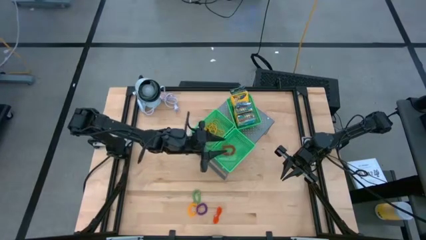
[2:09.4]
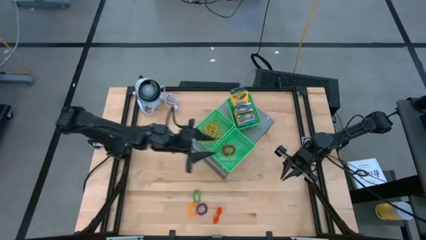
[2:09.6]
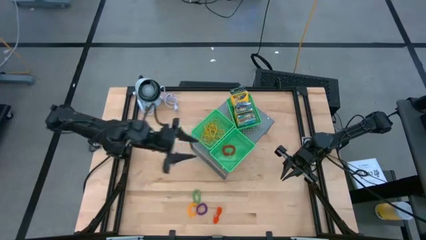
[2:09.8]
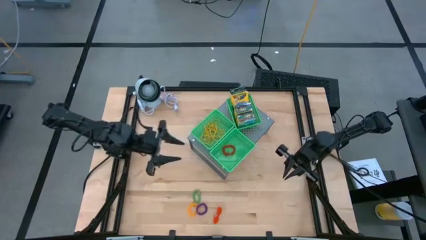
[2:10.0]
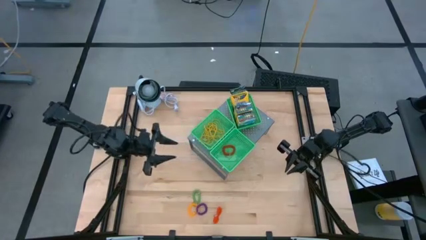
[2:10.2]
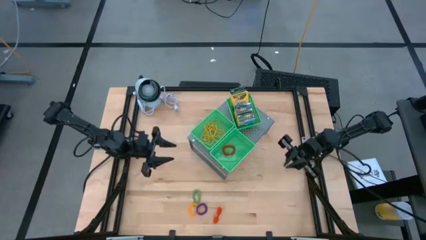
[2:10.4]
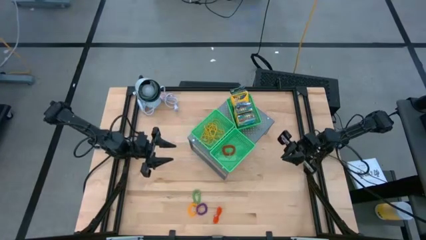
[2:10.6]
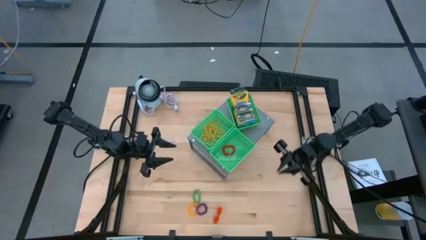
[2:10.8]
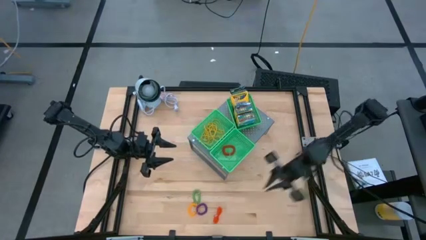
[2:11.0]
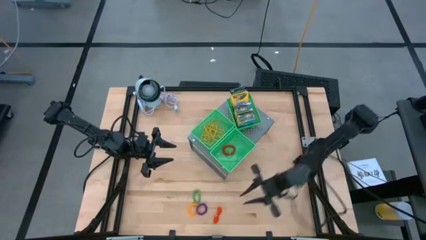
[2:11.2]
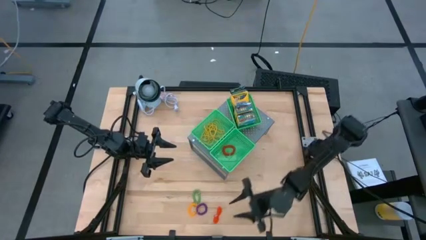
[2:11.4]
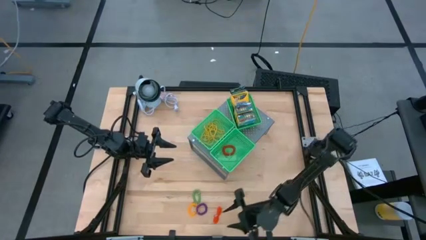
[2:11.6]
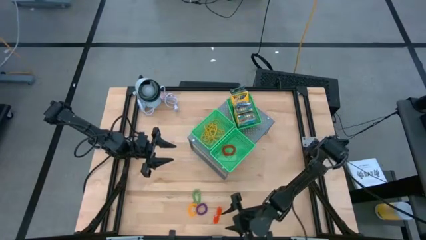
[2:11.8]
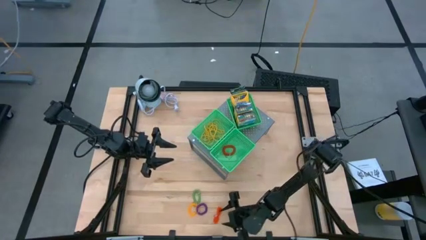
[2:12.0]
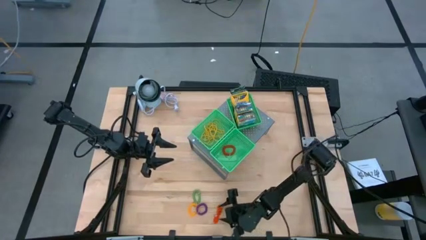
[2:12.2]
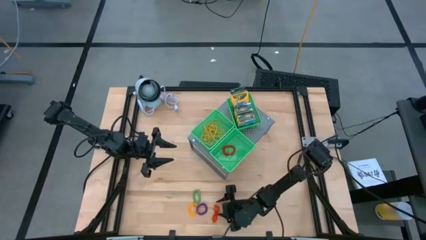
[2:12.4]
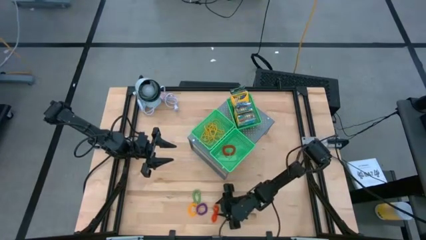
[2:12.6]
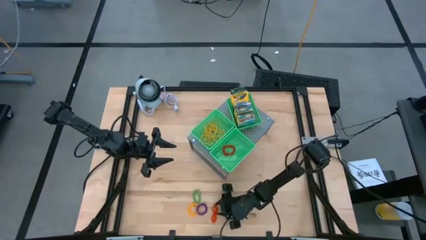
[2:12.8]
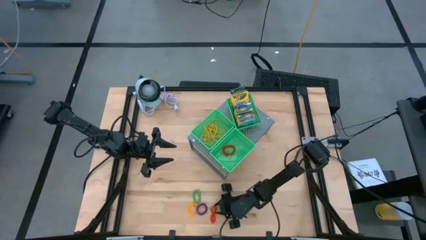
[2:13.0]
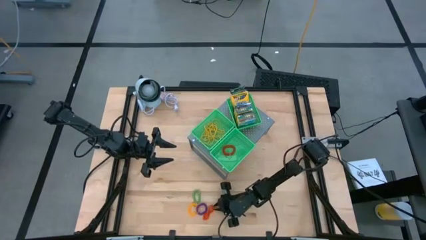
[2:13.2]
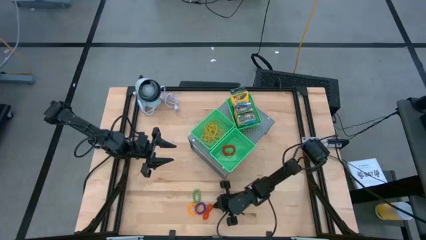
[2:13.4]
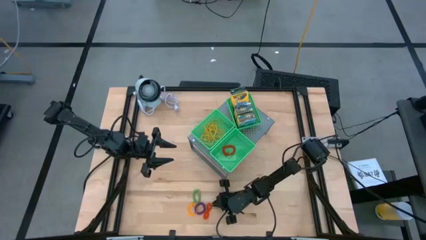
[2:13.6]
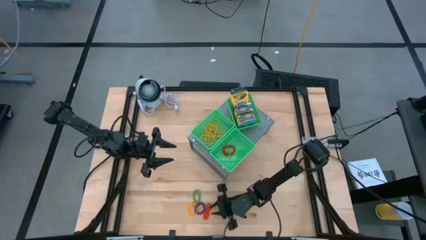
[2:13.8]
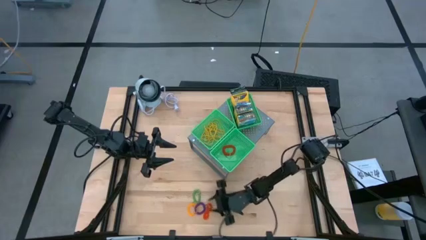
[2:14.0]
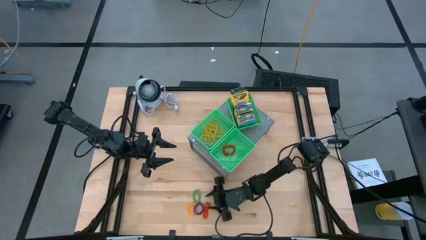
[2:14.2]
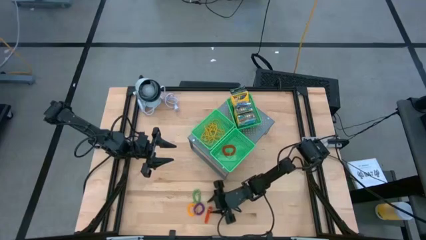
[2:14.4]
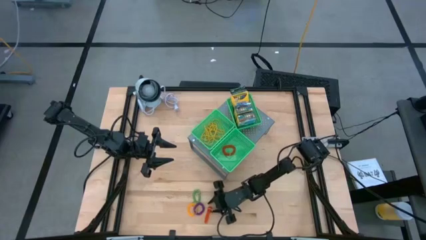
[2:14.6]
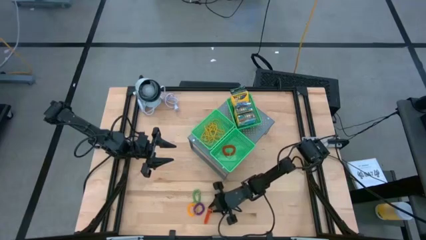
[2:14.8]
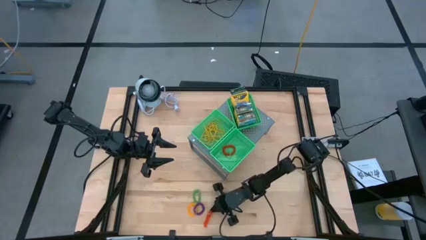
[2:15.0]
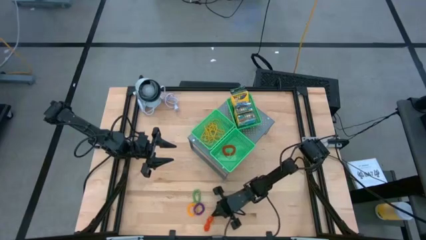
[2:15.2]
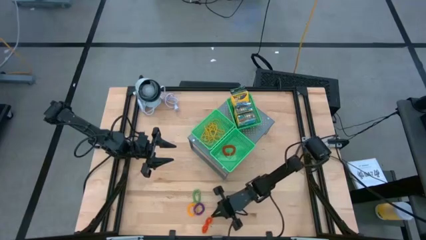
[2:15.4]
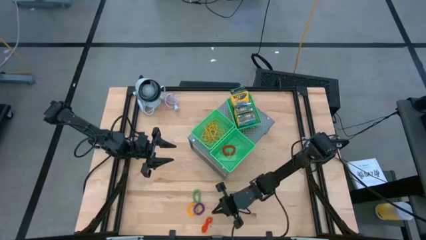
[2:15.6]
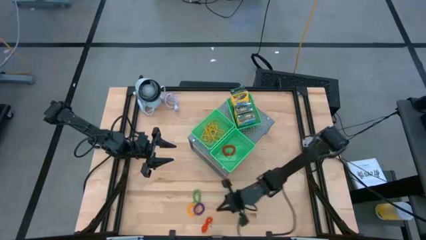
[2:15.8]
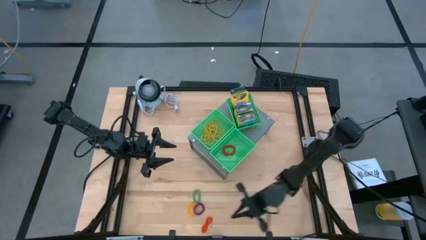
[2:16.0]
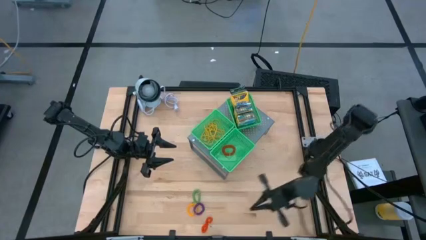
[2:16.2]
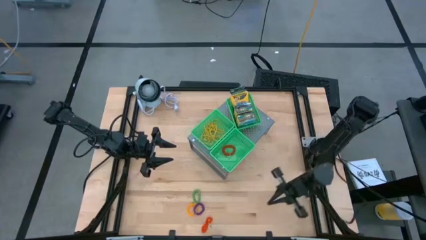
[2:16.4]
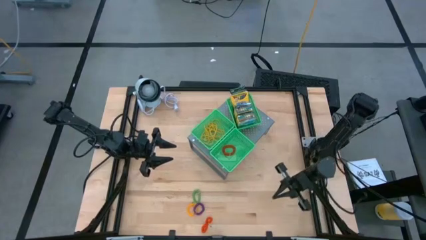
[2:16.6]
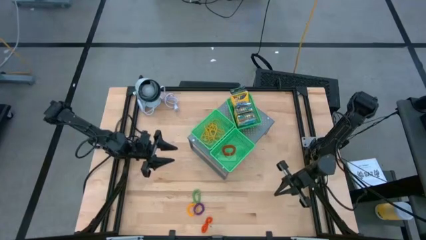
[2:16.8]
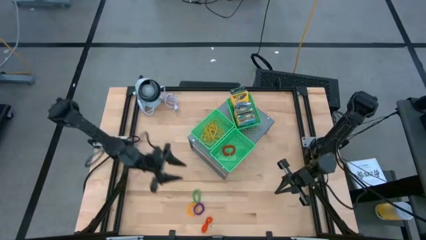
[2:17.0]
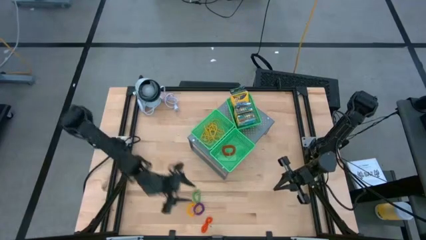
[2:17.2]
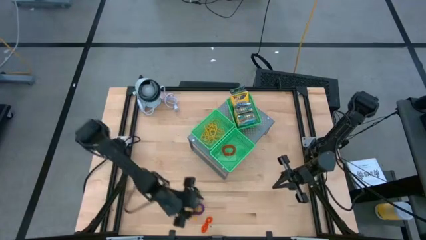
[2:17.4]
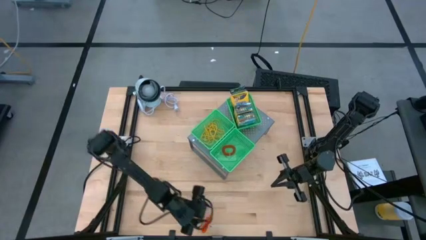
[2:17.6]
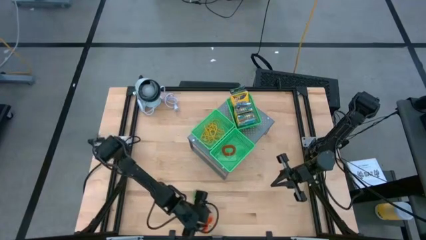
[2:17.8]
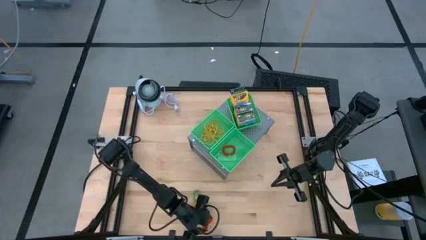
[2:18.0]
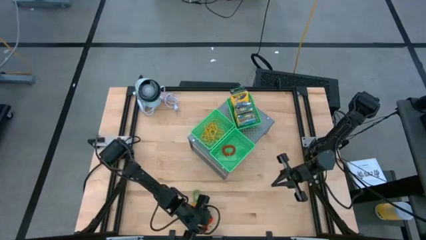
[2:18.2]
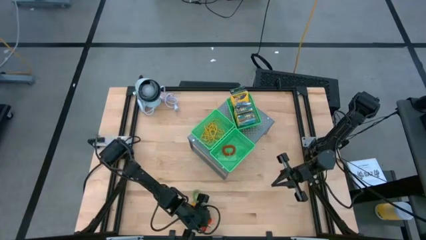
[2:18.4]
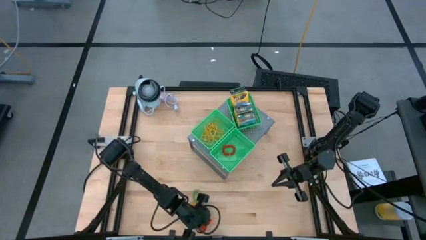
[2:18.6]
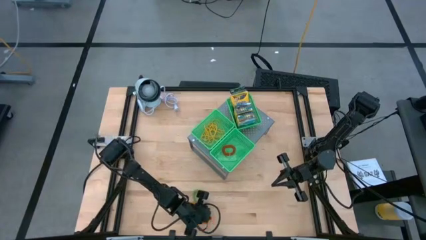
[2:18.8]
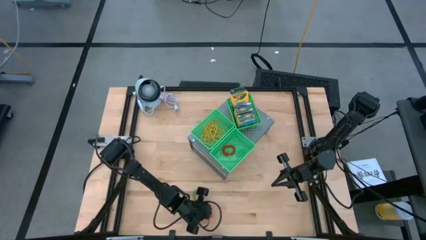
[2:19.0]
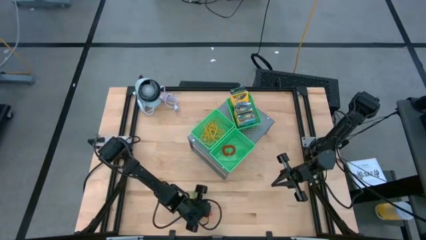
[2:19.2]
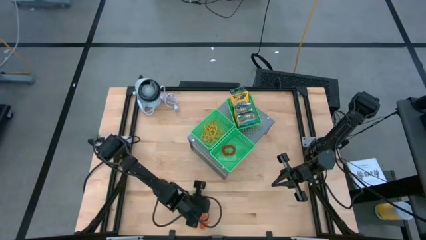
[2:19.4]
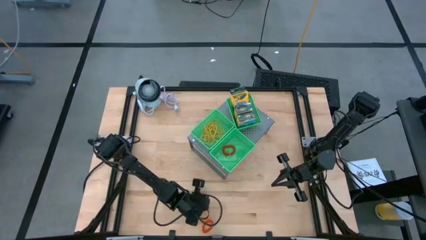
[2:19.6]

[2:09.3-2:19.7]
Task: Pick & Place Office Desk Supplies
Put the orange spring keychain into the bottom green bin on the shelf

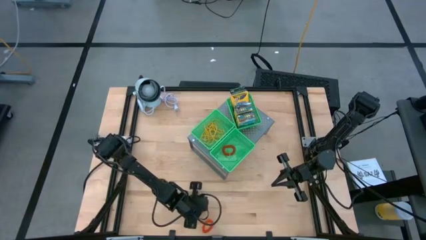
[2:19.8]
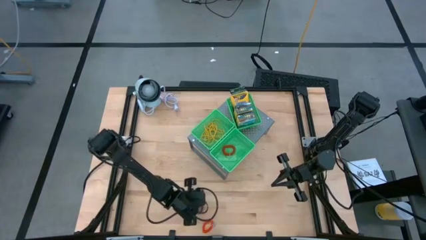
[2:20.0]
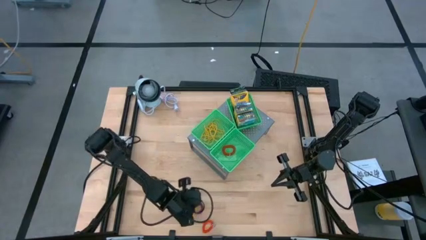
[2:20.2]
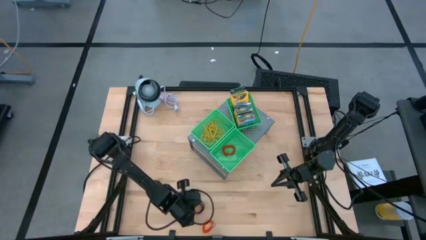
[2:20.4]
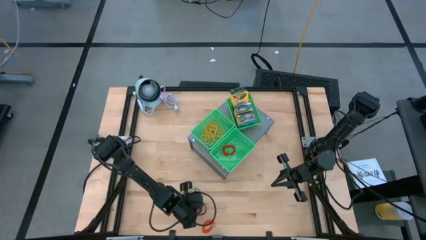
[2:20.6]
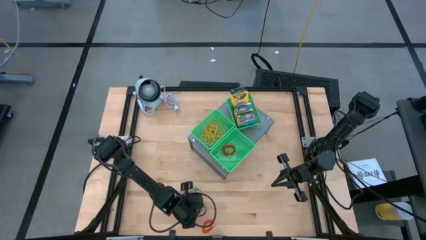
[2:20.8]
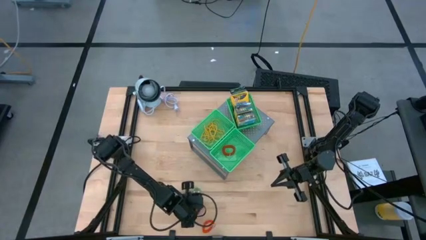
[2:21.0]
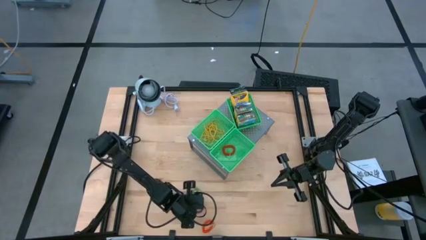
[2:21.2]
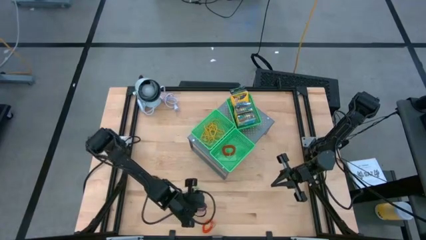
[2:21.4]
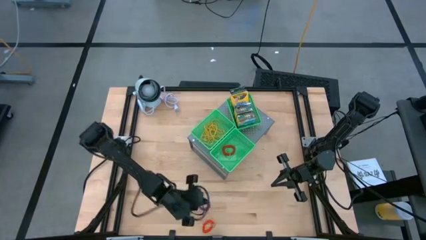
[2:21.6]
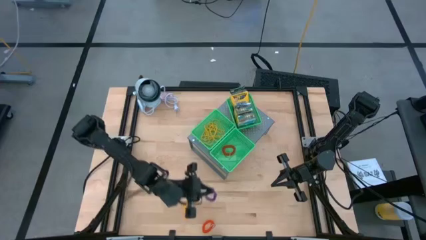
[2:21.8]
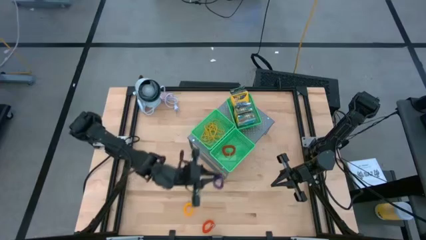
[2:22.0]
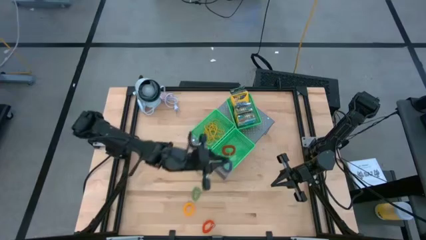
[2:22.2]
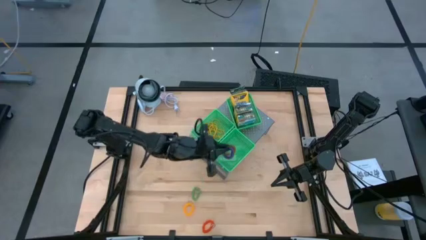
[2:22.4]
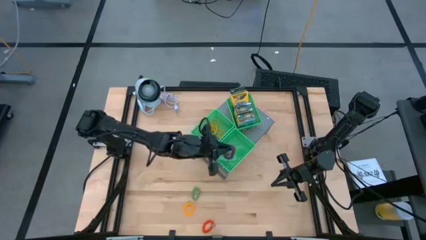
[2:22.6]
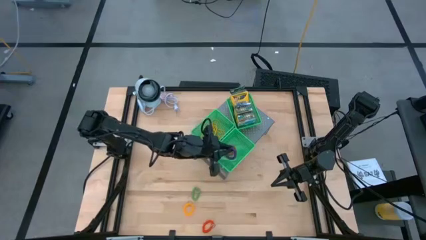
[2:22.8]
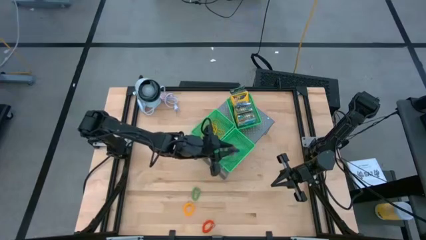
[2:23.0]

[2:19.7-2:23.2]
Put the purple spring keychain into the bottom green bin on the shelf

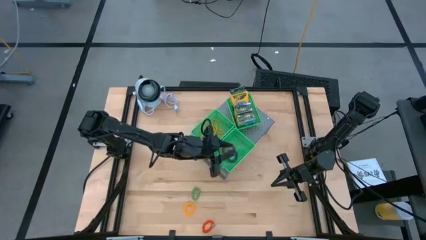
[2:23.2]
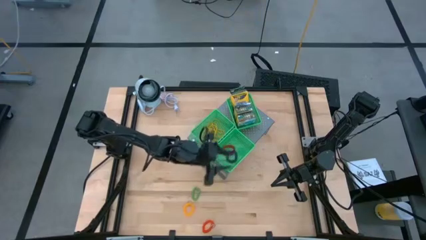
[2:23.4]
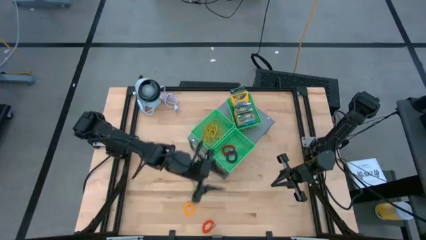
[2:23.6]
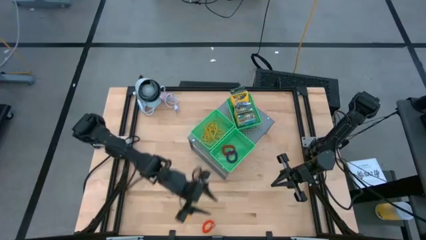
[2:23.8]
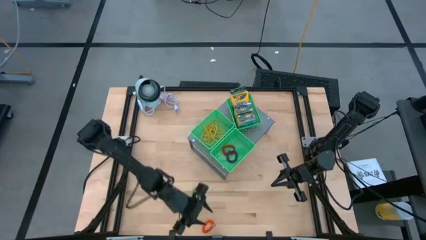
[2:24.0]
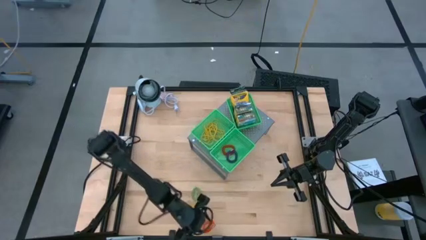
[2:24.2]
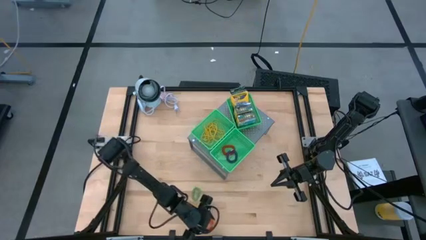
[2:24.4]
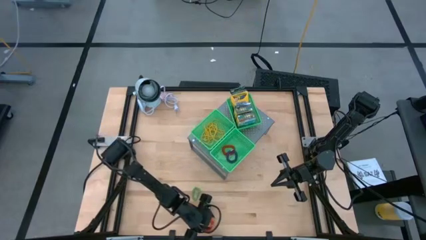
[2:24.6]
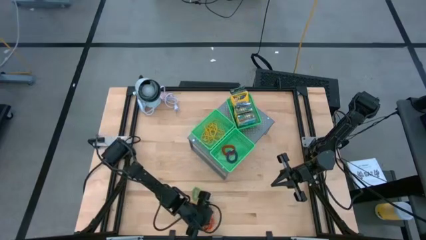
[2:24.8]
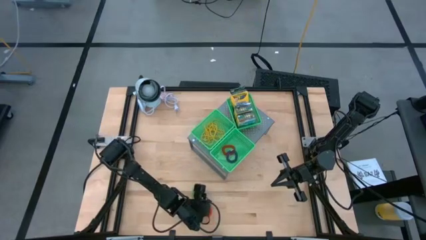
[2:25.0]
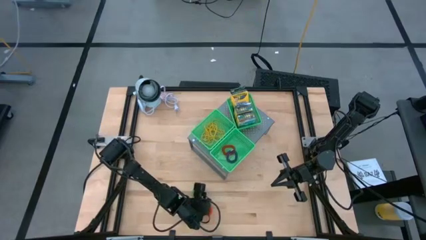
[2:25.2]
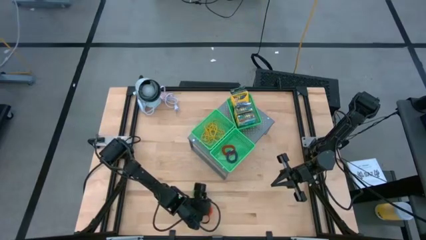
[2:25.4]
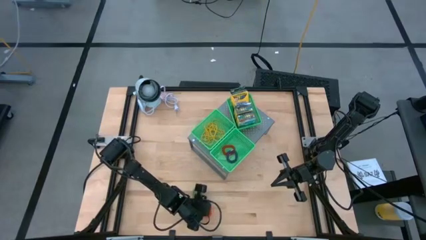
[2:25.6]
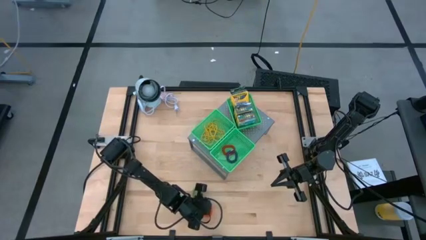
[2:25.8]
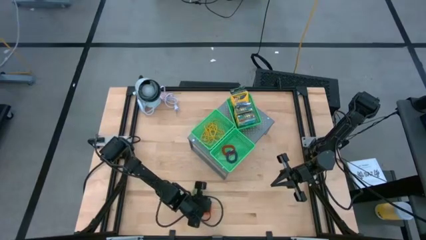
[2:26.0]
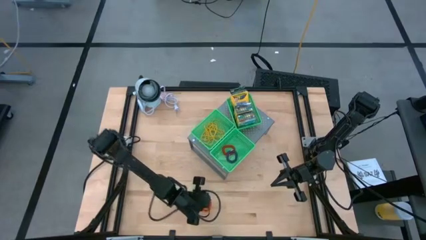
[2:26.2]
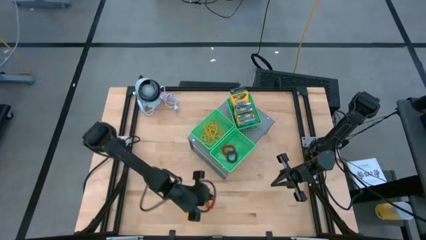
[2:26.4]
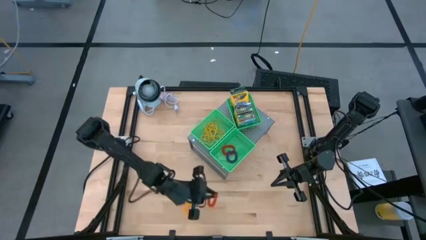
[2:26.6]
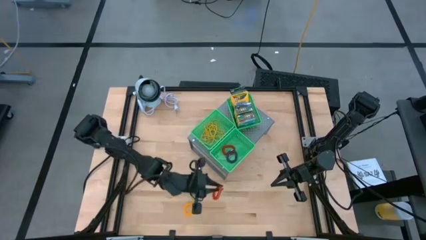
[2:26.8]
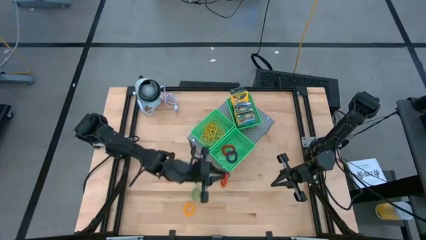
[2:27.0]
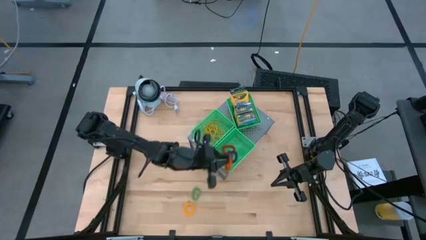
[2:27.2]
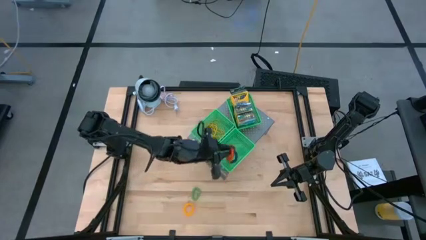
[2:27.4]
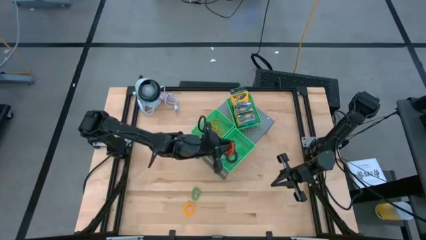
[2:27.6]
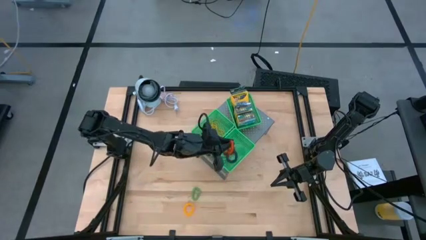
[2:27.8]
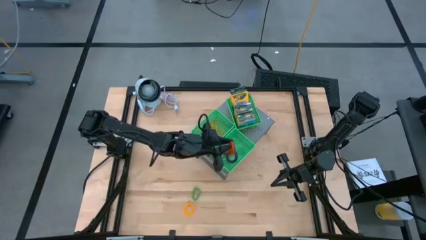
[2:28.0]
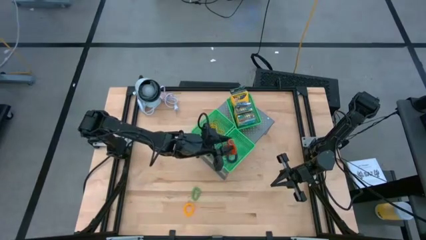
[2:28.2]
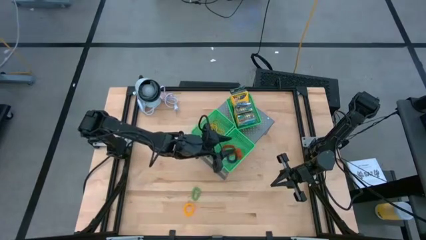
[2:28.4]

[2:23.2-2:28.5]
Put the orange spring keychain into the bottom green bin on the shelf
